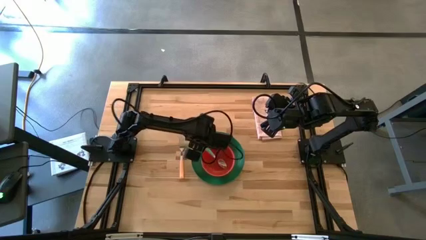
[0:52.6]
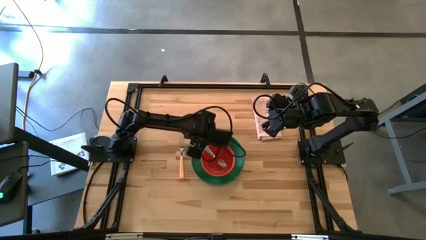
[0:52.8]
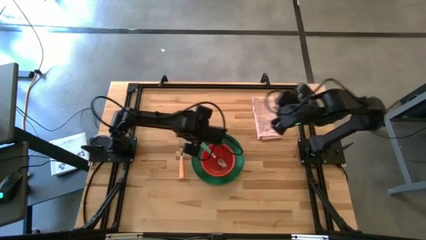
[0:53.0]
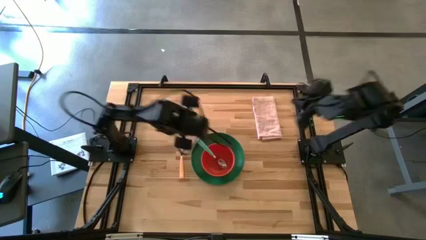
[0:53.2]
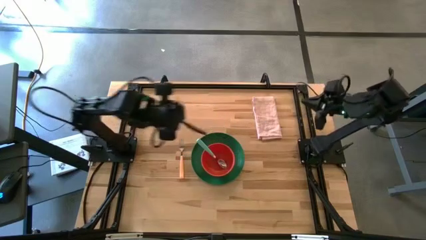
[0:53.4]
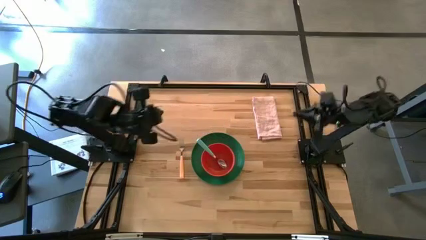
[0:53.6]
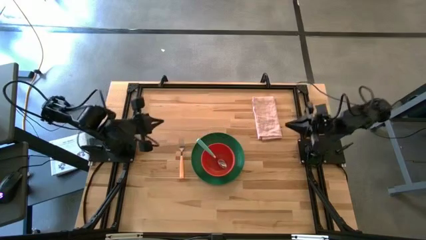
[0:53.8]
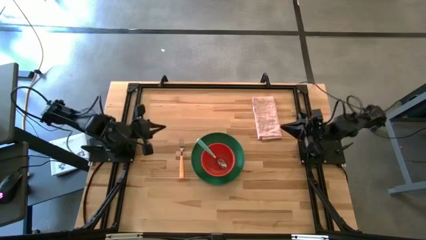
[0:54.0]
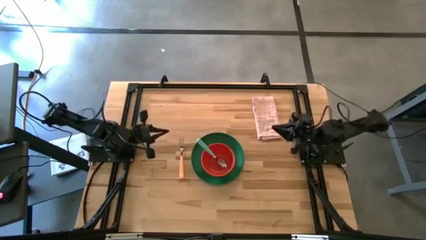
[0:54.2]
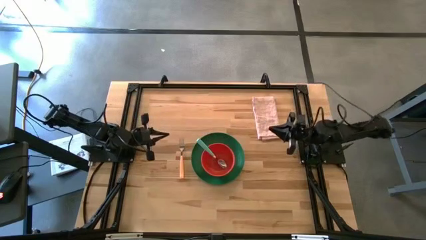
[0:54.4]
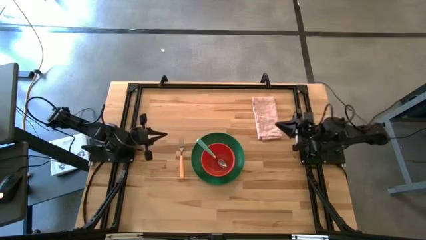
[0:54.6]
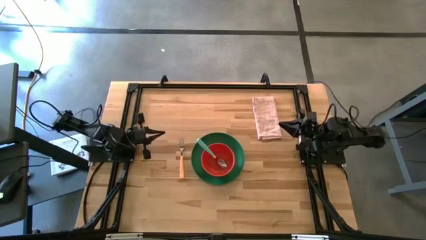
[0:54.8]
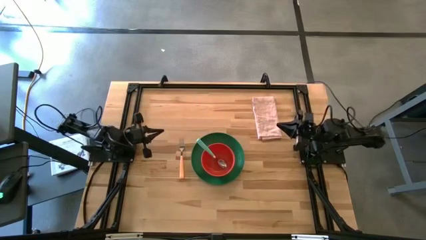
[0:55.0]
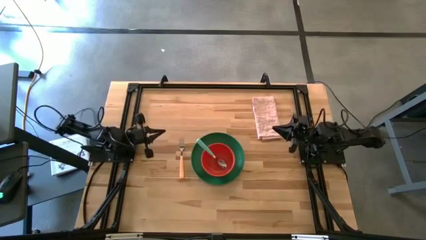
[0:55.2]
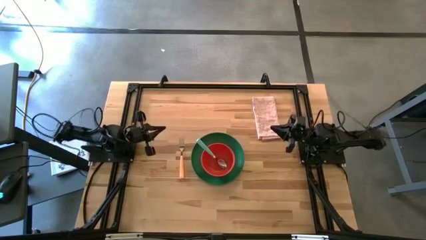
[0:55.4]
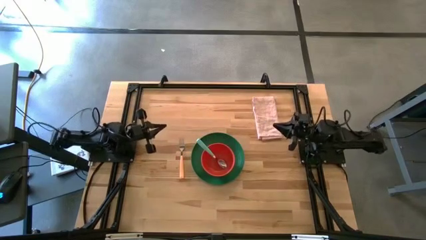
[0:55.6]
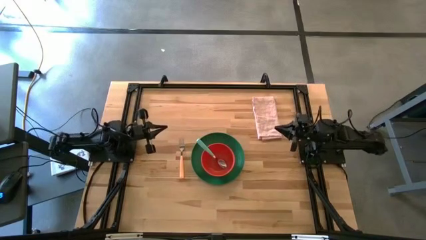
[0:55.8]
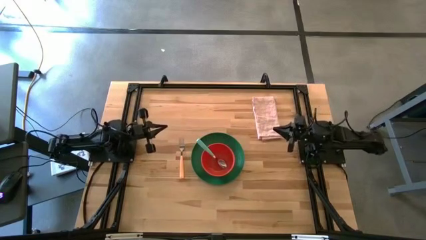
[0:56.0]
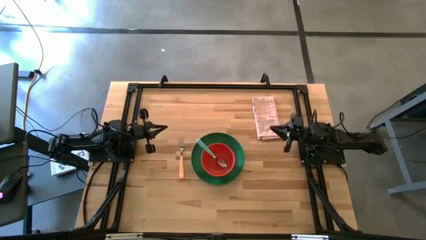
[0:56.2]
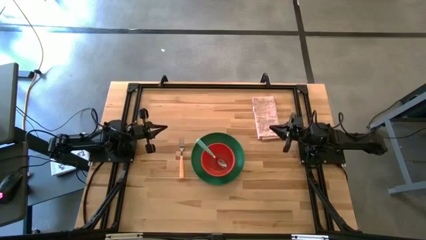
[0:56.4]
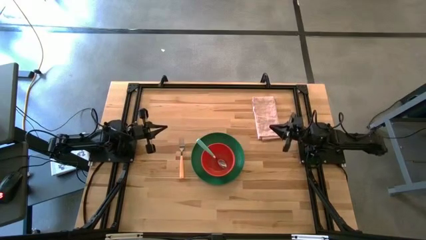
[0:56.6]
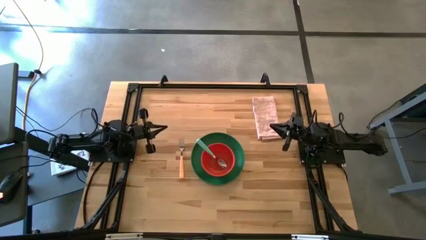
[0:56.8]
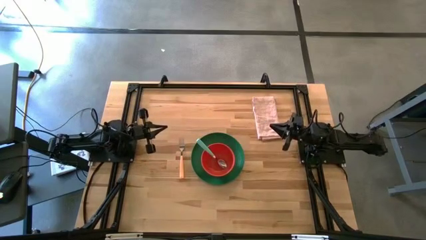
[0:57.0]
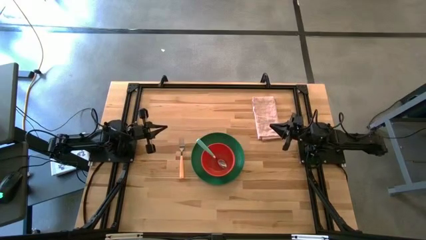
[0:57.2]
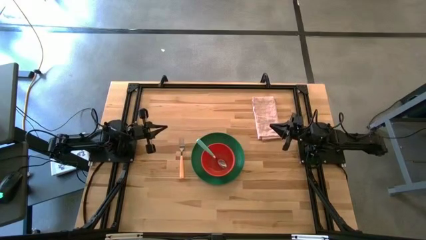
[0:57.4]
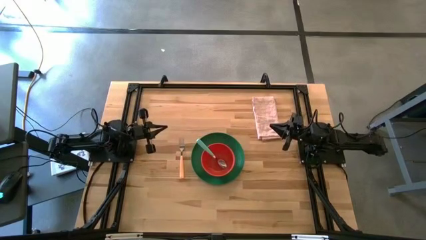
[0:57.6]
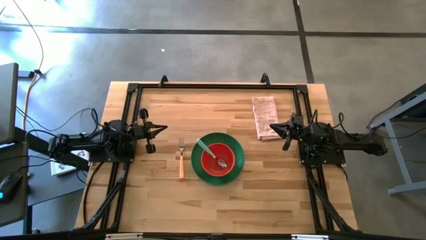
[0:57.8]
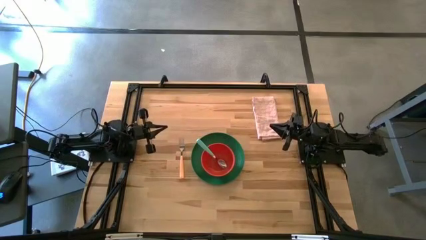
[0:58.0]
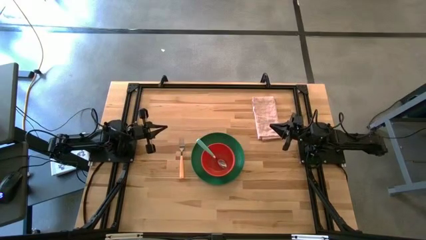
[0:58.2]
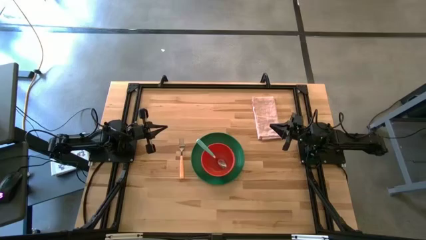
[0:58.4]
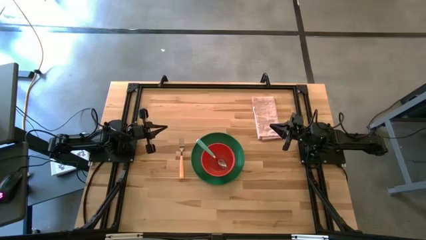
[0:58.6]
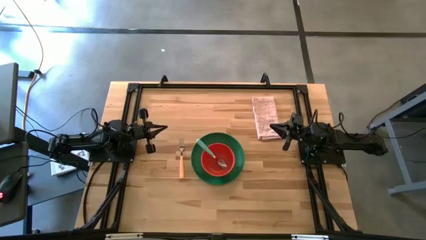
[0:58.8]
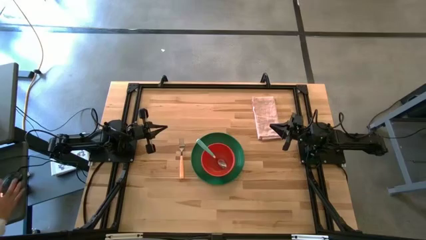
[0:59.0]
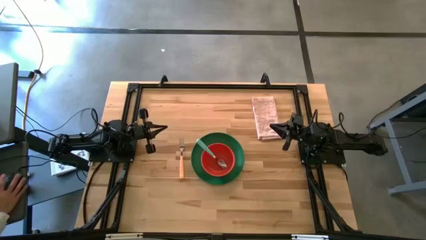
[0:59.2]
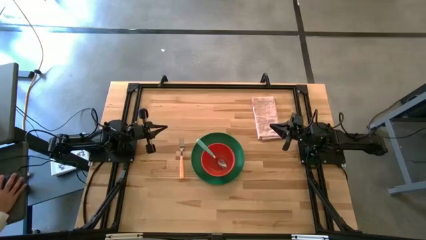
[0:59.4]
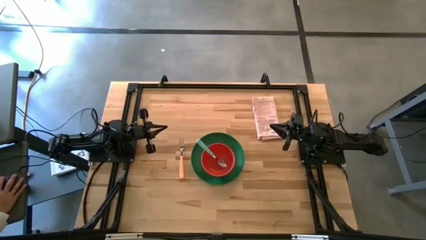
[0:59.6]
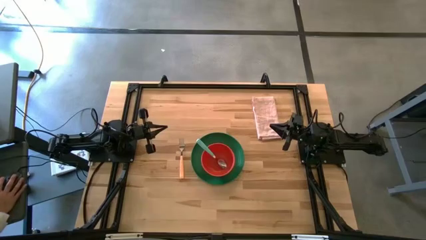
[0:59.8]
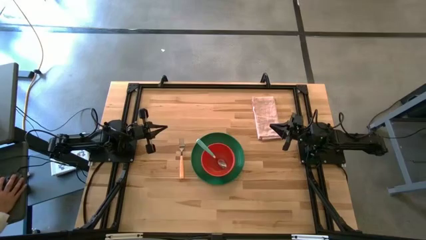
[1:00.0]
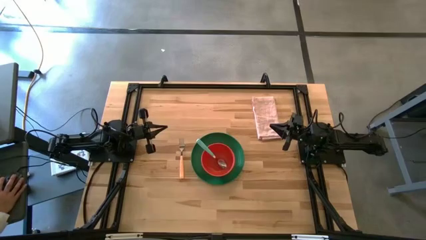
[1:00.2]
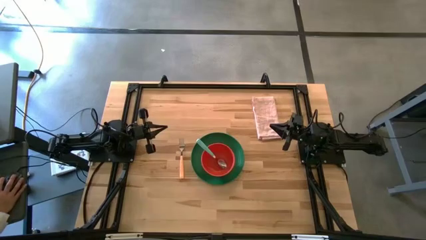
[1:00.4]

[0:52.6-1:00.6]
Task: Set table place
Return to Home Position

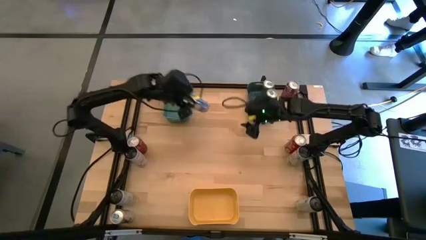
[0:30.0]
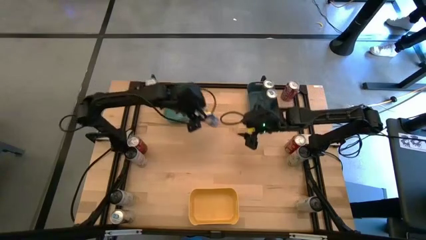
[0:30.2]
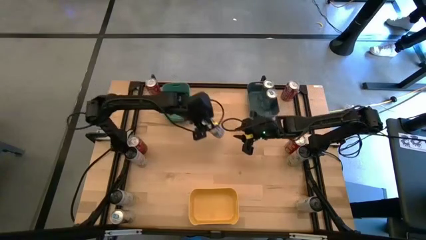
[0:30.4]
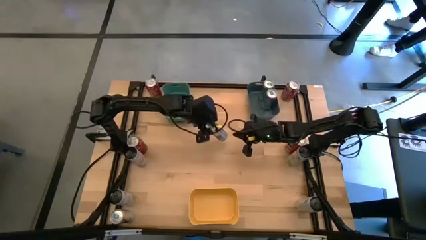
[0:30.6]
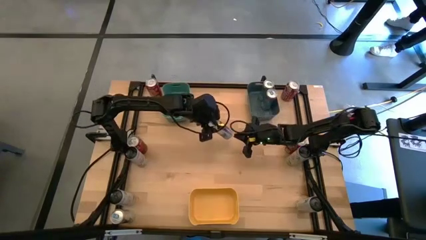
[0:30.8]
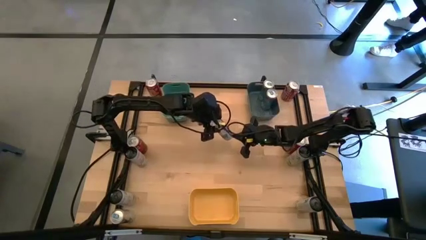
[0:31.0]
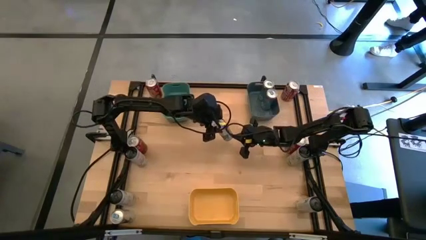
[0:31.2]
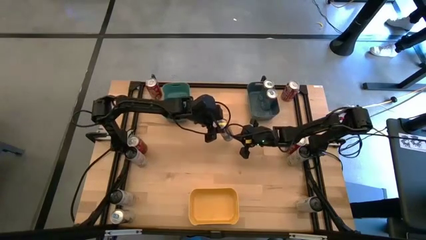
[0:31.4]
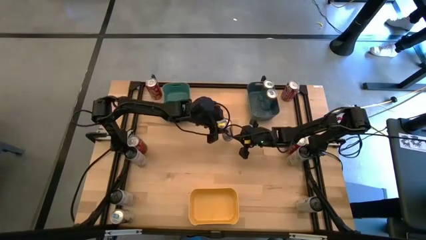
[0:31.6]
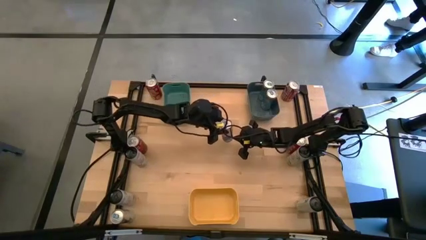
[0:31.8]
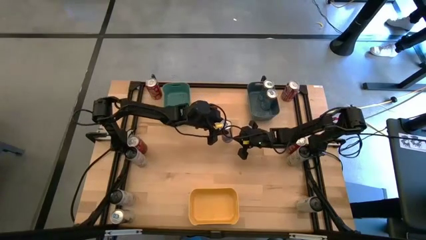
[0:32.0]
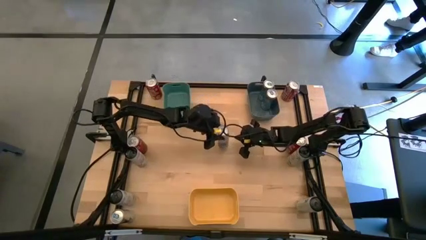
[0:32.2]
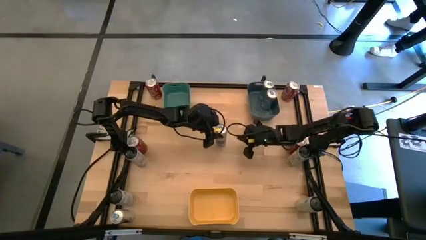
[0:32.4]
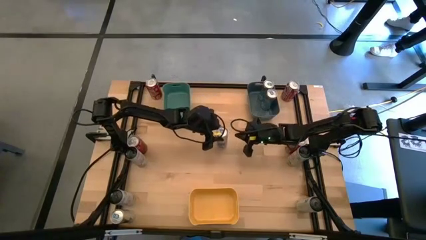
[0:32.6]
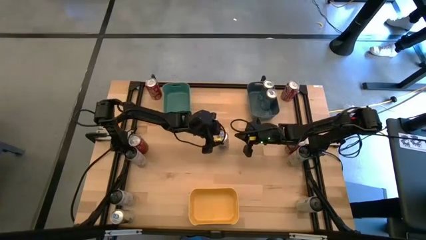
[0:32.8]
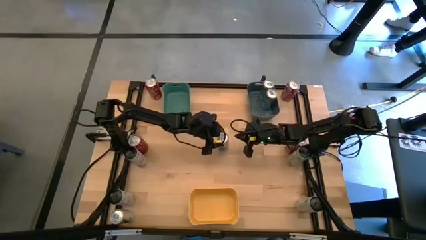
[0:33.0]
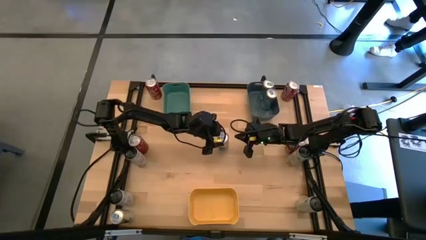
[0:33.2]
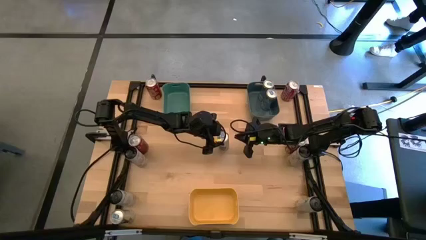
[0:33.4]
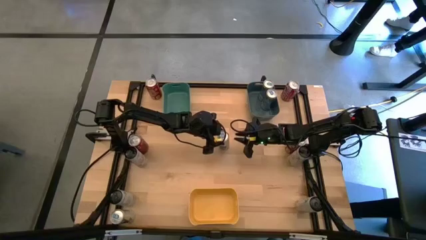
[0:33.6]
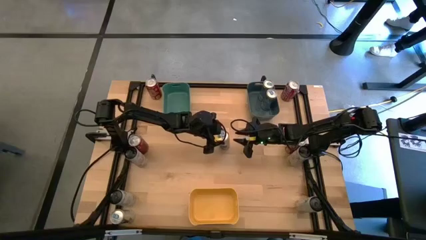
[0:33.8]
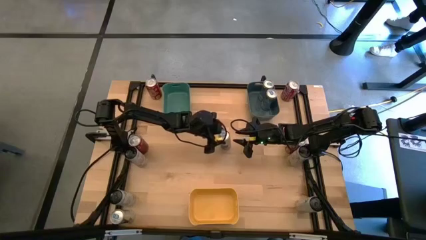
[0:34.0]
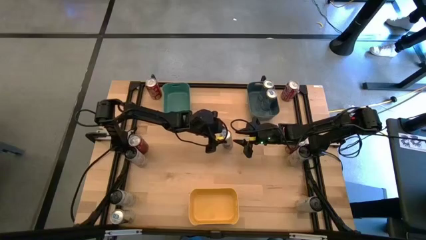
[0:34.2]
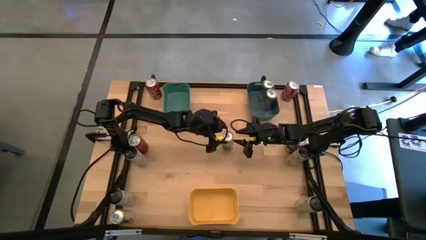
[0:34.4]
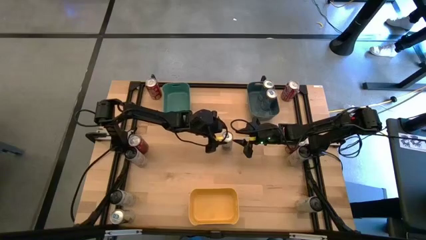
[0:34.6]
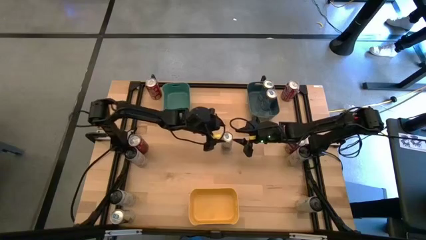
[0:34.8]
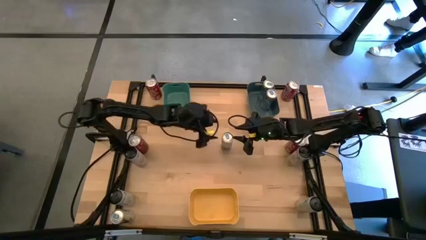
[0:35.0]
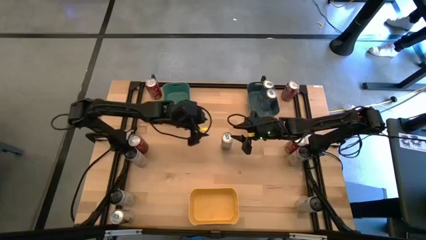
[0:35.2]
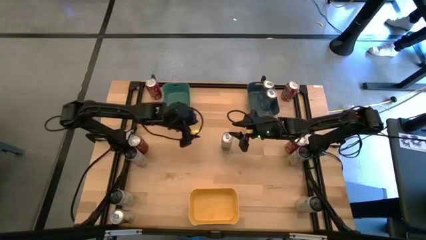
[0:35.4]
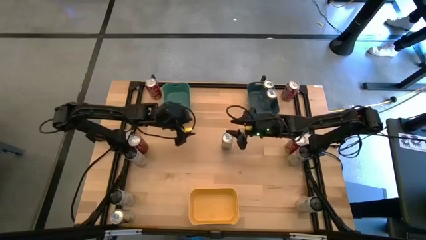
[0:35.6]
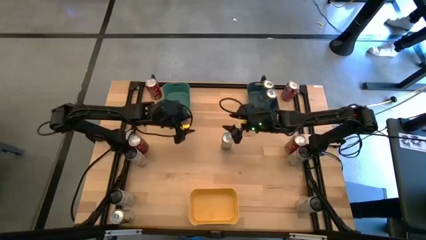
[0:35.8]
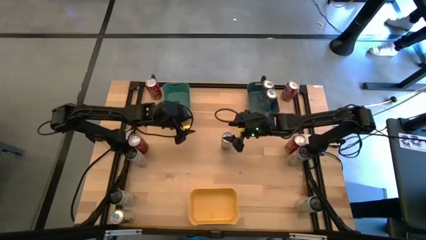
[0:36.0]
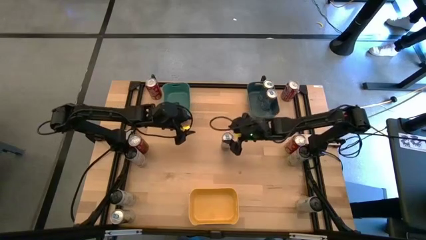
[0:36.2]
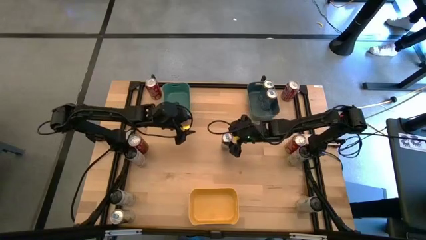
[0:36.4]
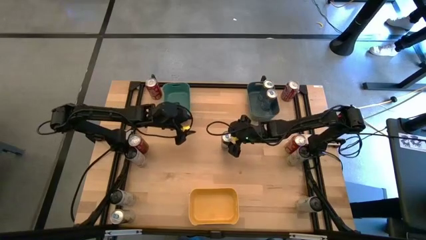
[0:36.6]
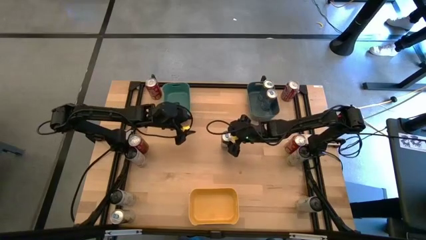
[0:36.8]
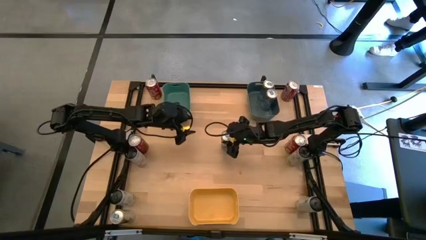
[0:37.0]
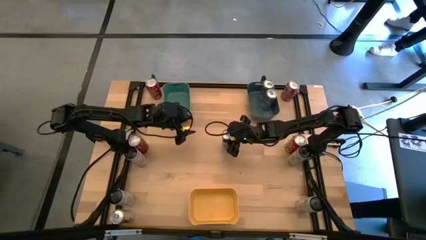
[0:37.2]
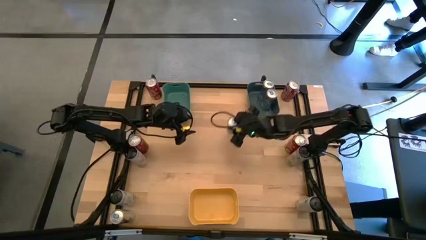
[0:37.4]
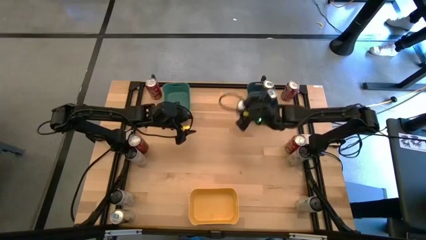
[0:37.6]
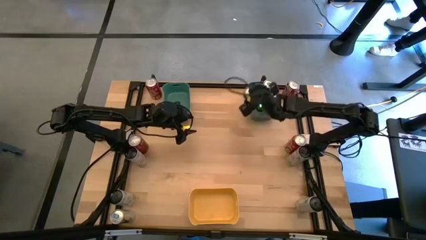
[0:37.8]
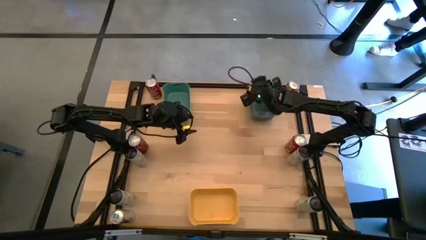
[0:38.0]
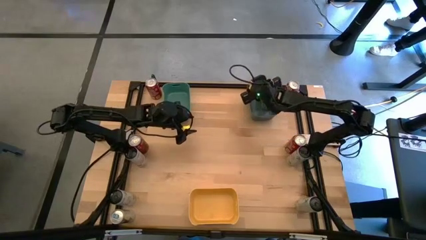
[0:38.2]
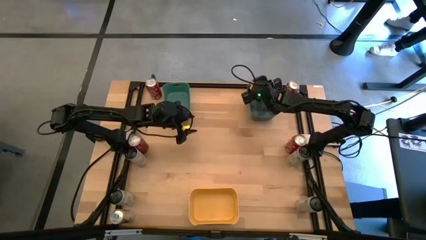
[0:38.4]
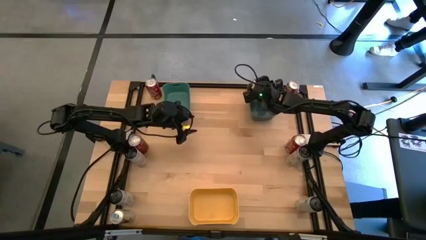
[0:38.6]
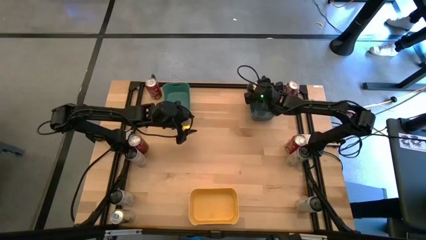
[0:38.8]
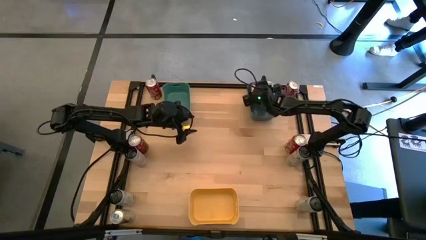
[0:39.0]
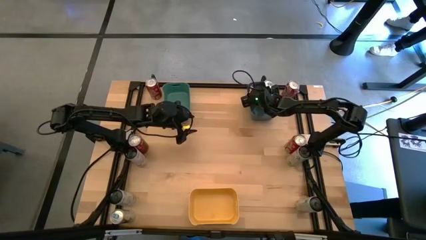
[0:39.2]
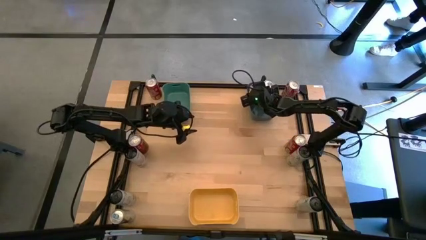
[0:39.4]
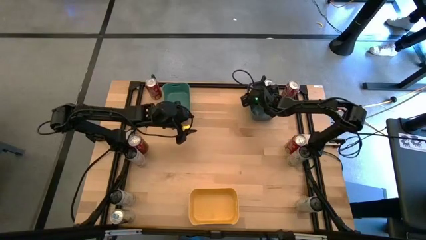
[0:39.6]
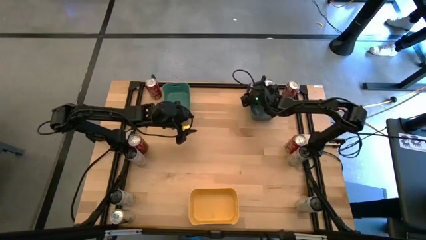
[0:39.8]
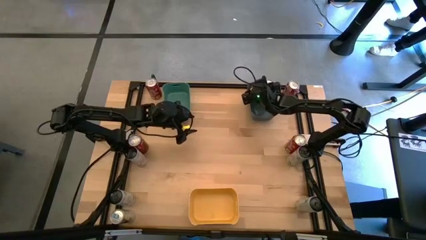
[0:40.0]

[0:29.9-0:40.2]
Task: Sort soda cans
Put the top blue soda can into the blue bin
